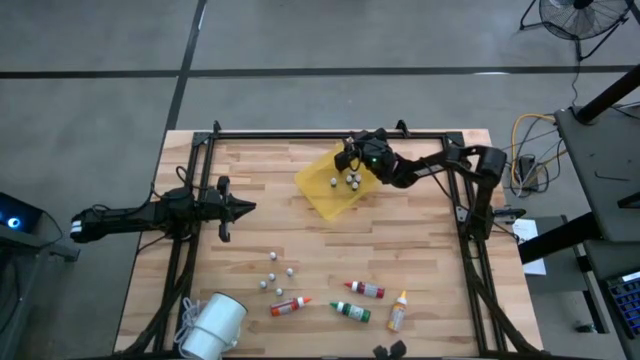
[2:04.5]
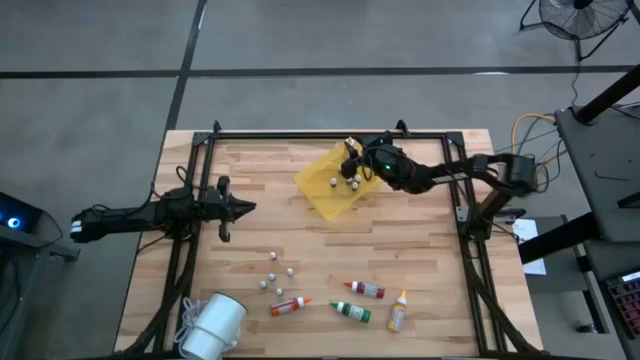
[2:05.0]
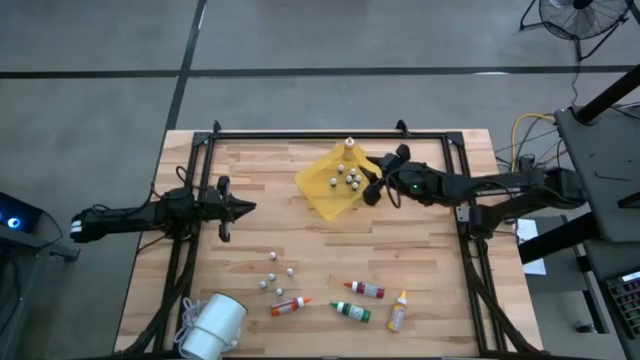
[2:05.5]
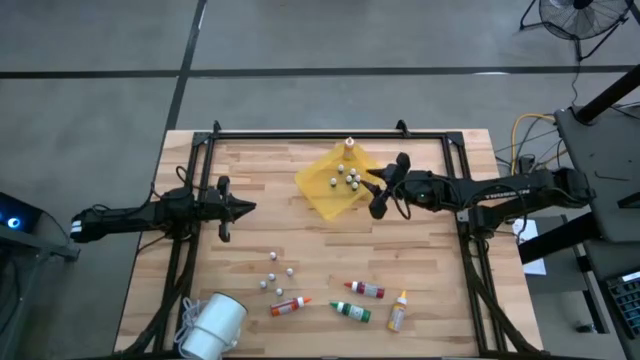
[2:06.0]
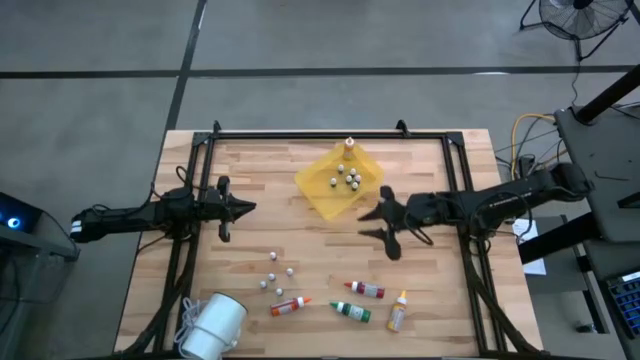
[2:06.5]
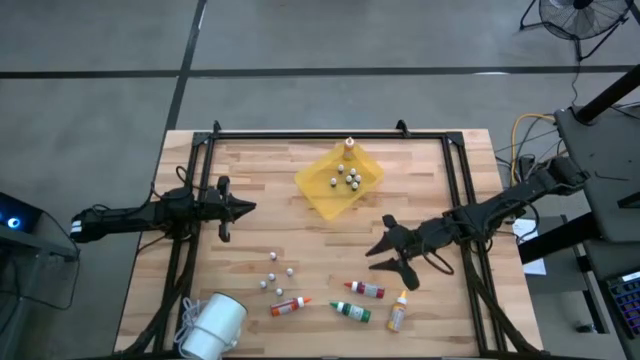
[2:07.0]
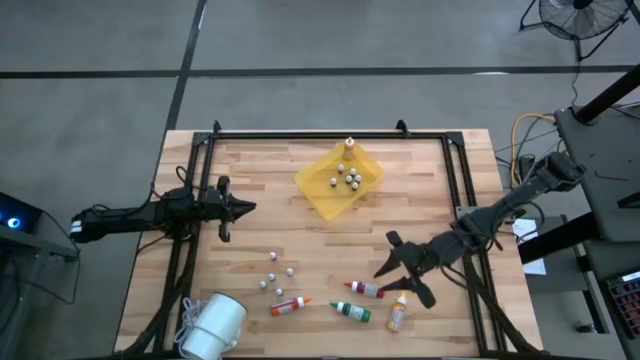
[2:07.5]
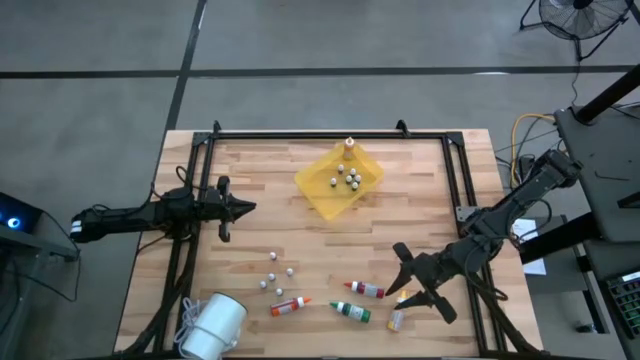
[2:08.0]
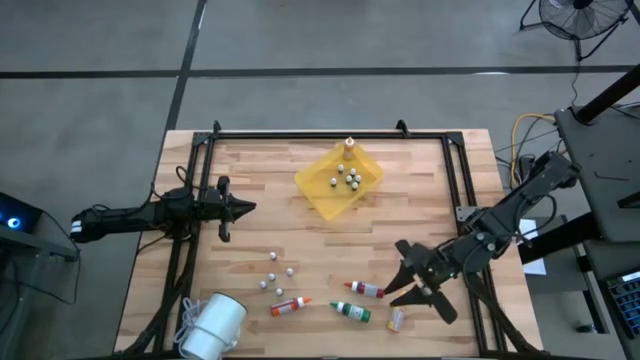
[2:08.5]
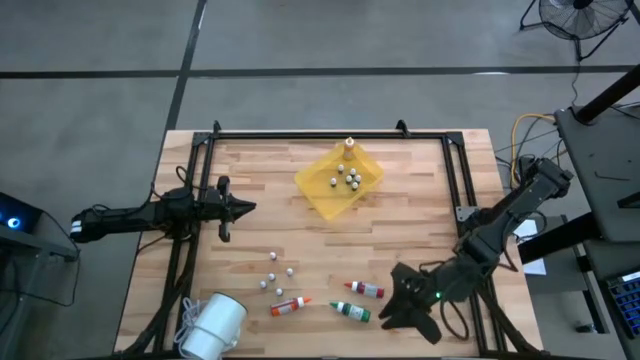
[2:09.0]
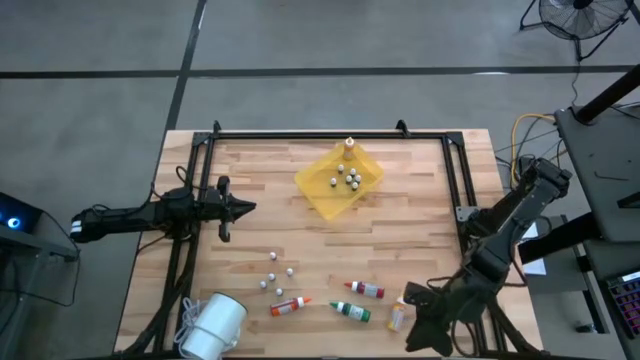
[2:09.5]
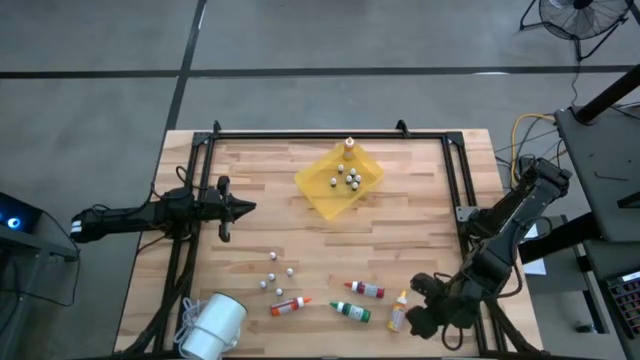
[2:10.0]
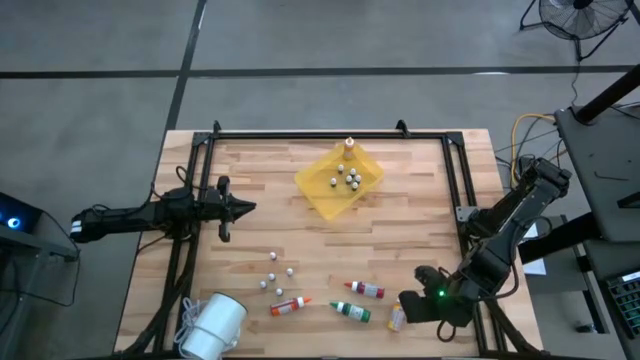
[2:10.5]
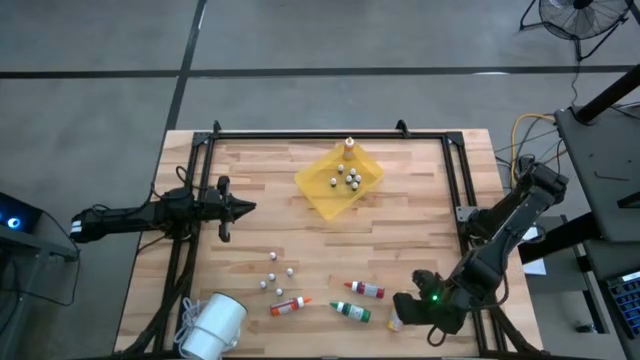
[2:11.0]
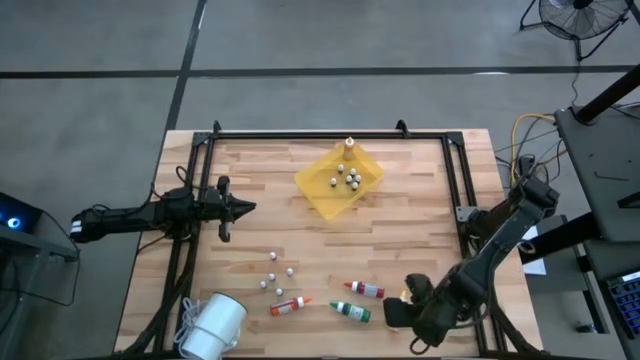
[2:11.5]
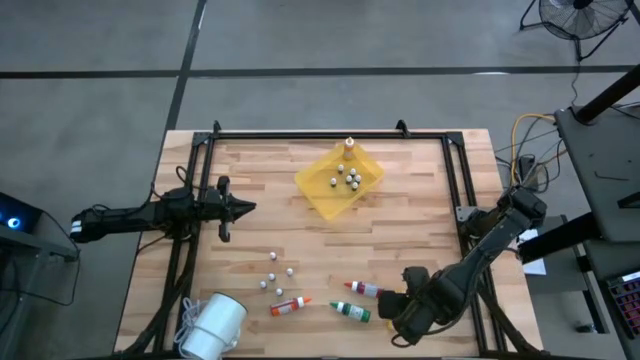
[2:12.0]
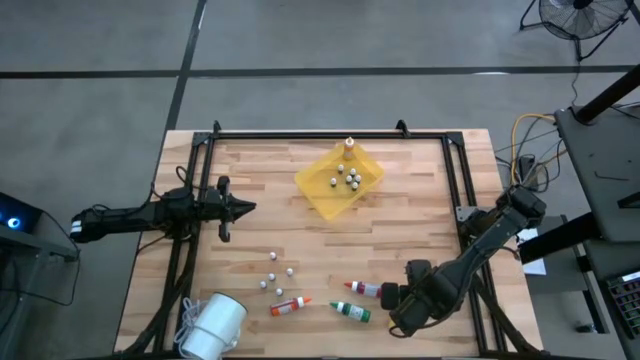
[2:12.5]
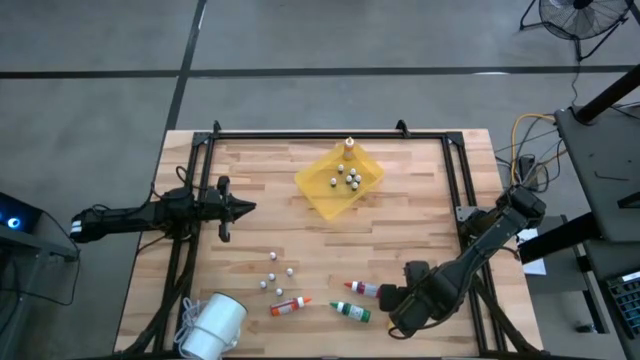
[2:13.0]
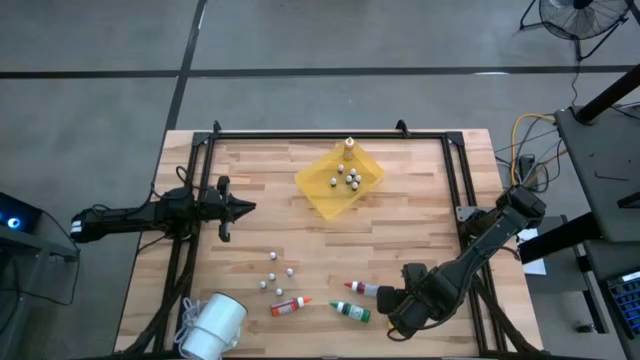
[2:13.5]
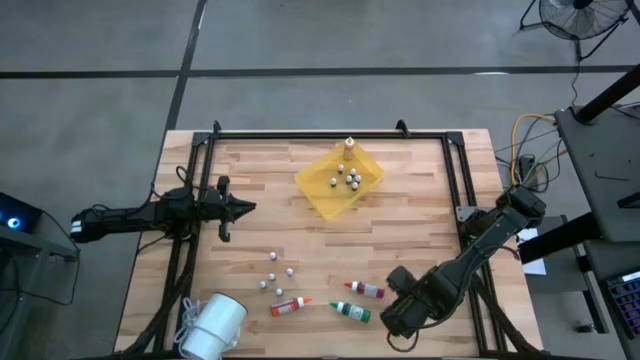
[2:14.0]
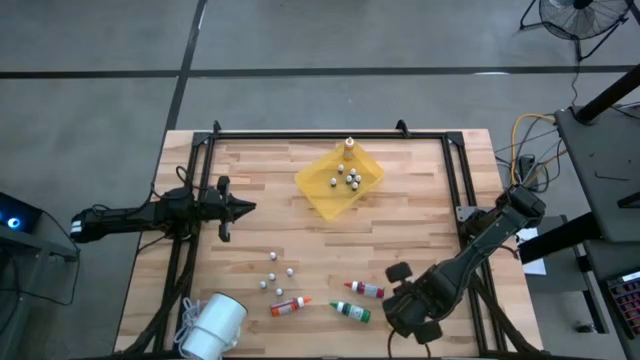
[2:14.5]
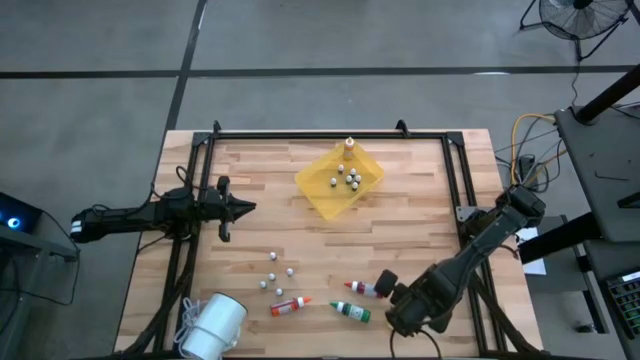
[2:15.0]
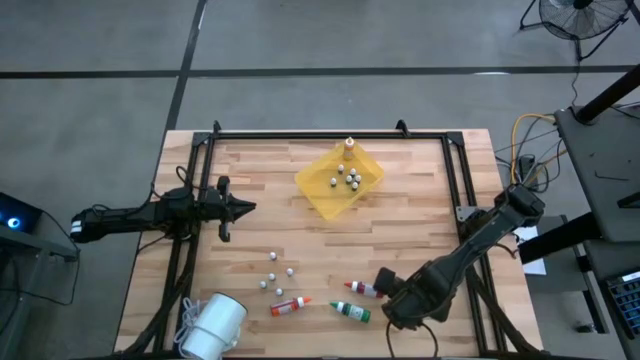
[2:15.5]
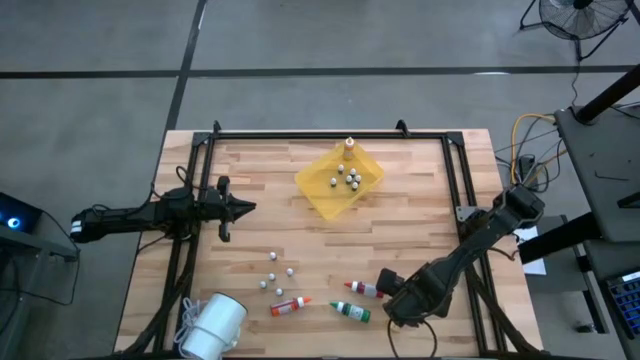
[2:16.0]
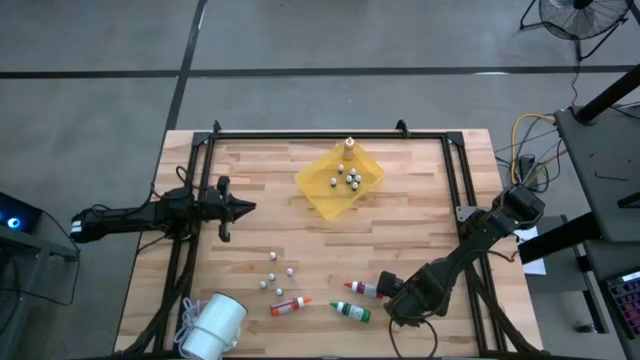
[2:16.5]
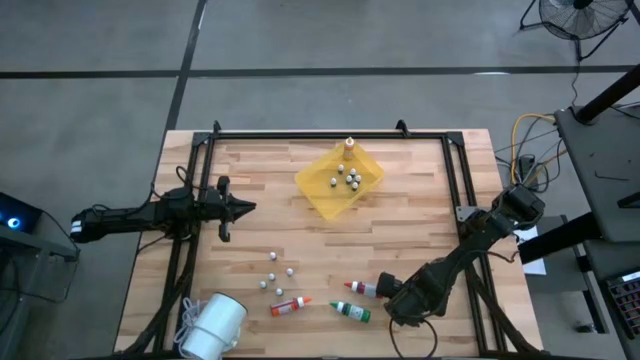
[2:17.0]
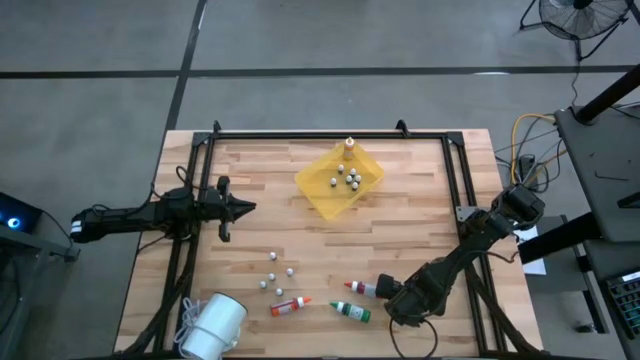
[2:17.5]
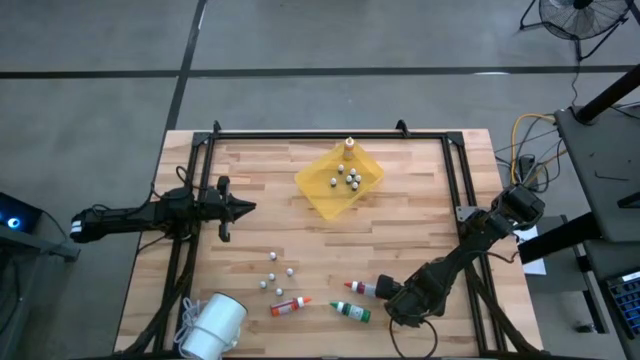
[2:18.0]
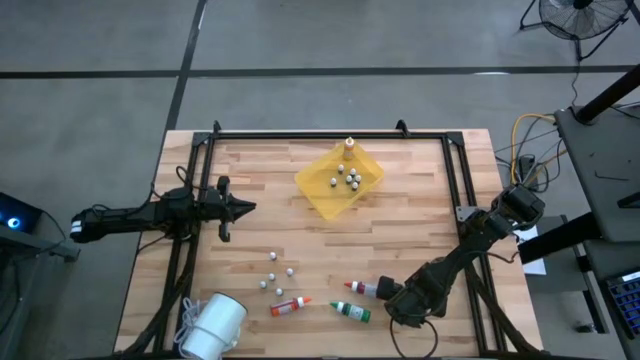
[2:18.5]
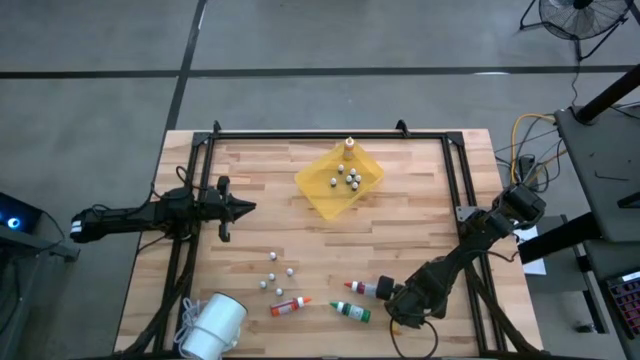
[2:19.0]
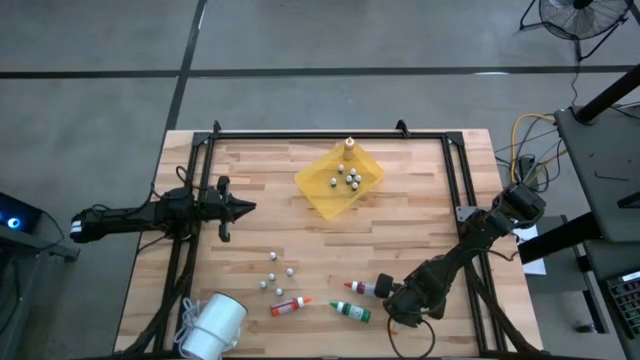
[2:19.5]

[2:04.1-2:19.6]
Task: Pick & Place food coloring
Put the large yellow food coloring bottle into the yellow bin
